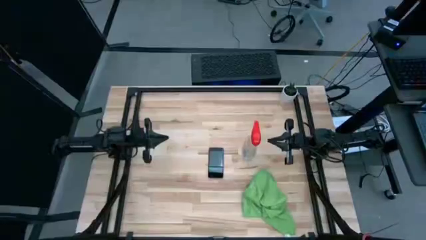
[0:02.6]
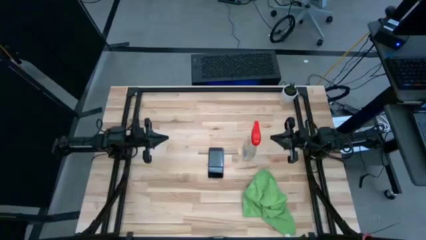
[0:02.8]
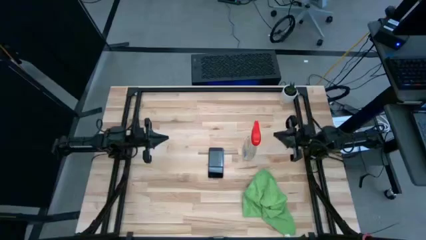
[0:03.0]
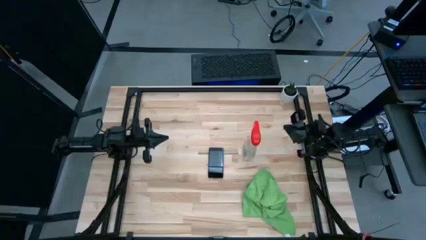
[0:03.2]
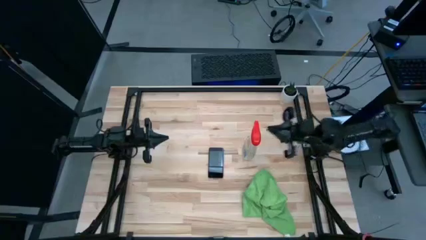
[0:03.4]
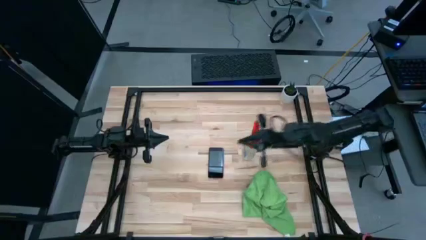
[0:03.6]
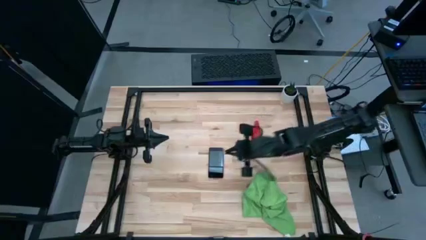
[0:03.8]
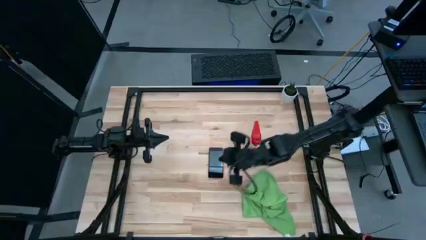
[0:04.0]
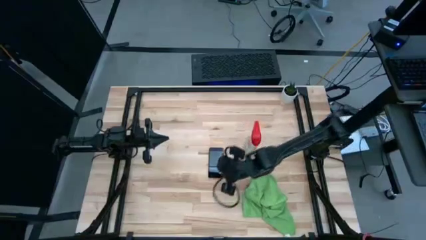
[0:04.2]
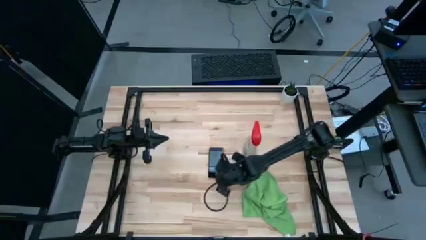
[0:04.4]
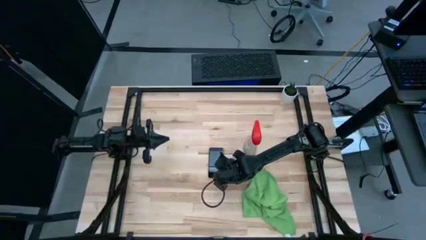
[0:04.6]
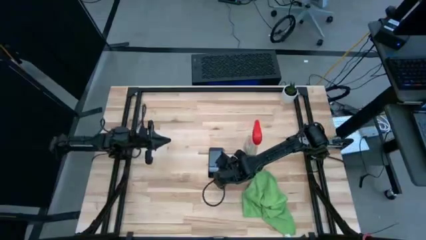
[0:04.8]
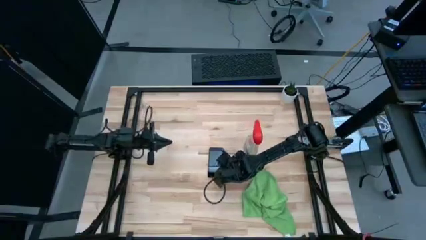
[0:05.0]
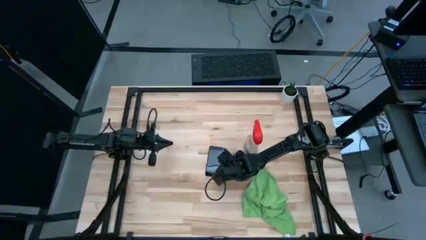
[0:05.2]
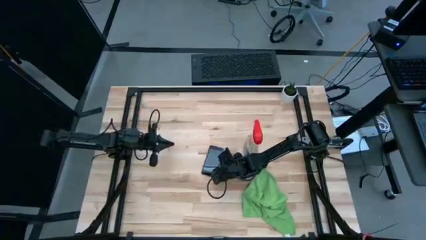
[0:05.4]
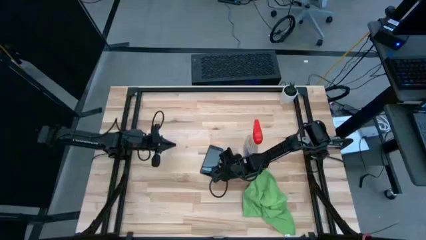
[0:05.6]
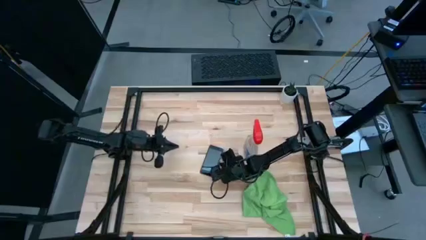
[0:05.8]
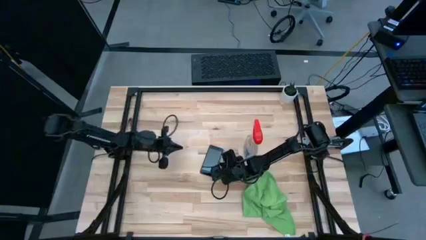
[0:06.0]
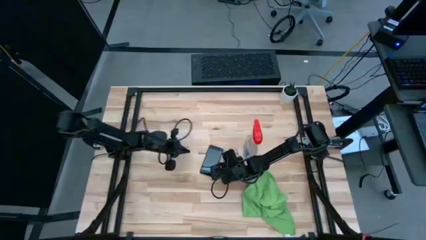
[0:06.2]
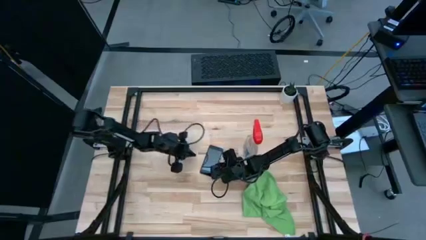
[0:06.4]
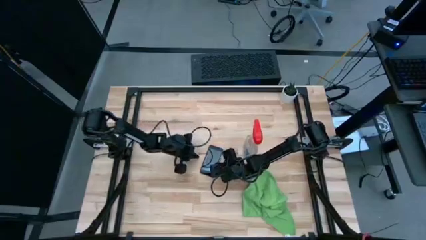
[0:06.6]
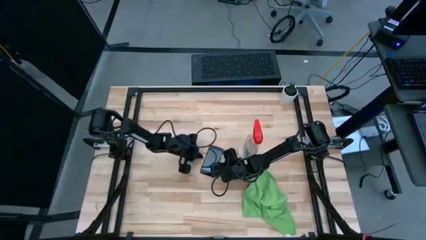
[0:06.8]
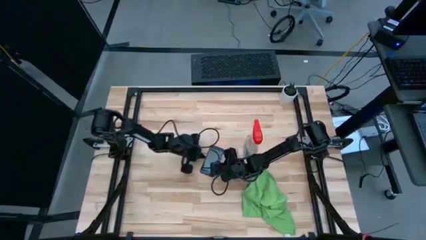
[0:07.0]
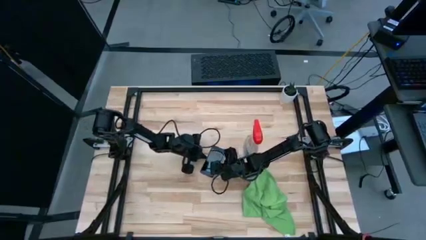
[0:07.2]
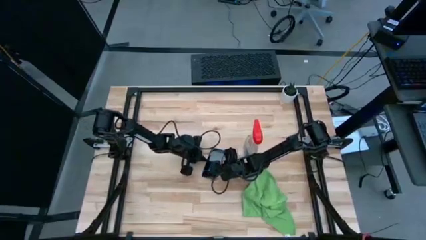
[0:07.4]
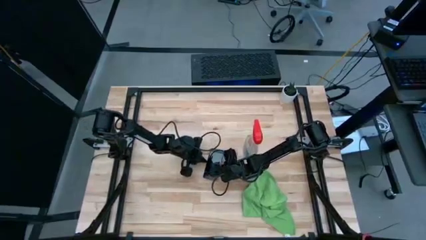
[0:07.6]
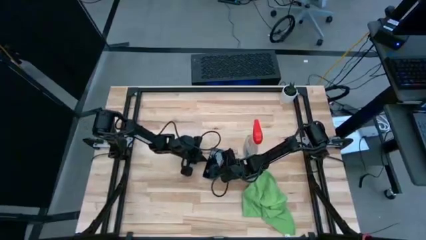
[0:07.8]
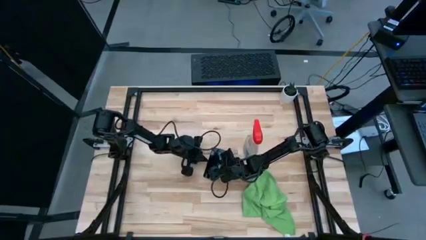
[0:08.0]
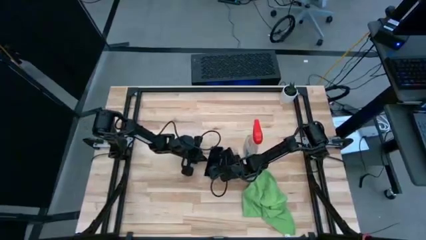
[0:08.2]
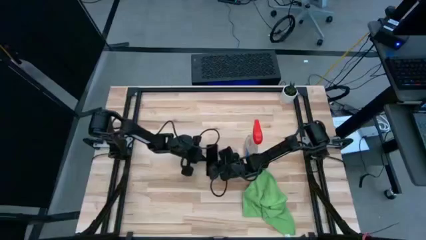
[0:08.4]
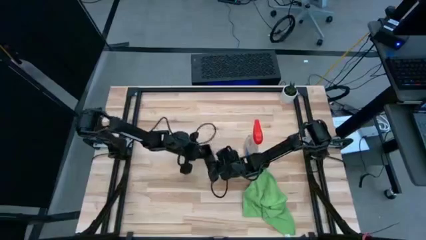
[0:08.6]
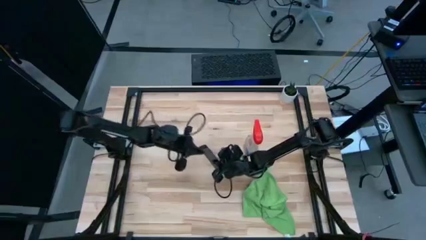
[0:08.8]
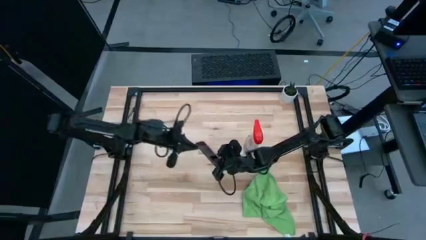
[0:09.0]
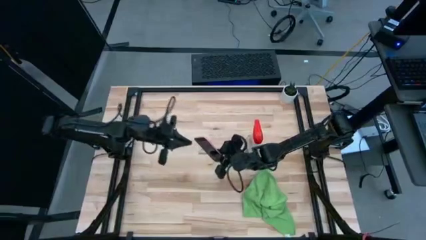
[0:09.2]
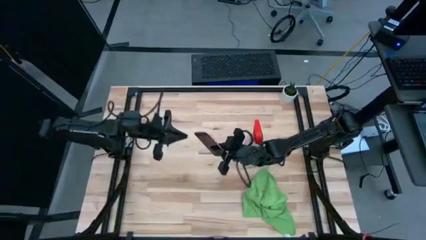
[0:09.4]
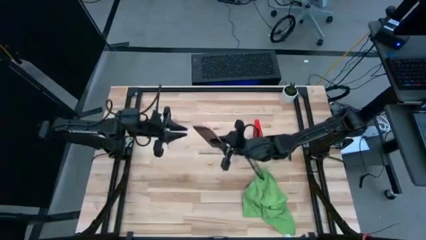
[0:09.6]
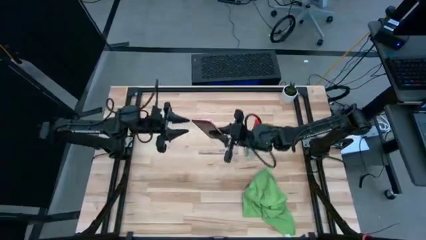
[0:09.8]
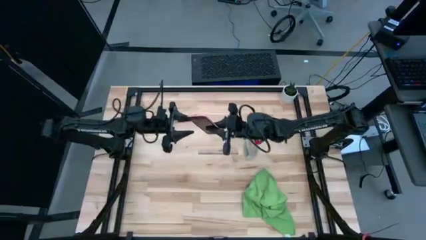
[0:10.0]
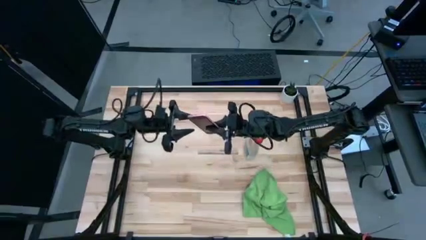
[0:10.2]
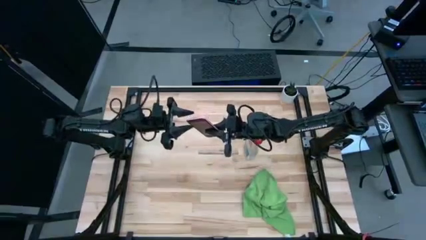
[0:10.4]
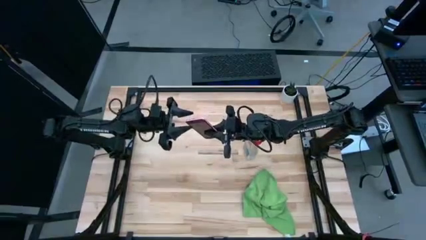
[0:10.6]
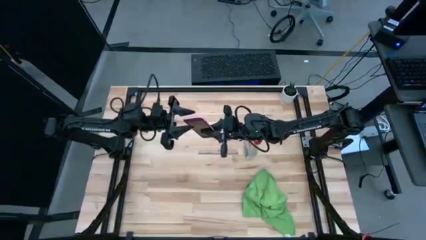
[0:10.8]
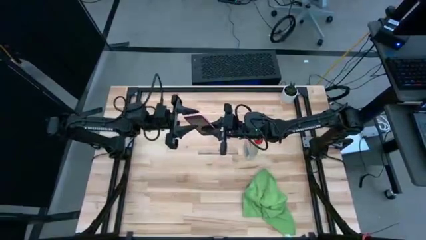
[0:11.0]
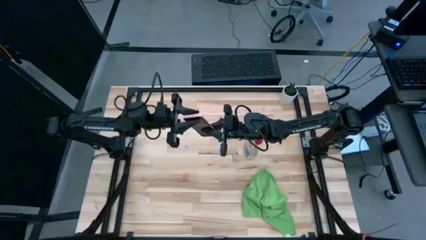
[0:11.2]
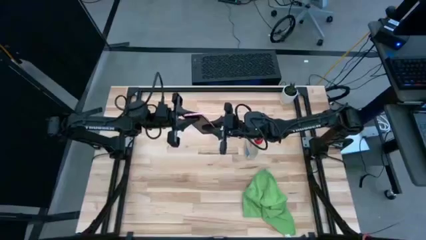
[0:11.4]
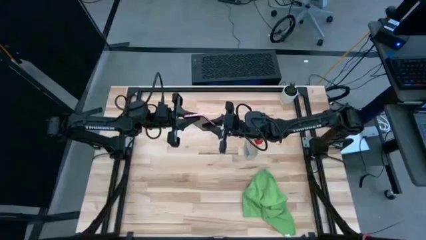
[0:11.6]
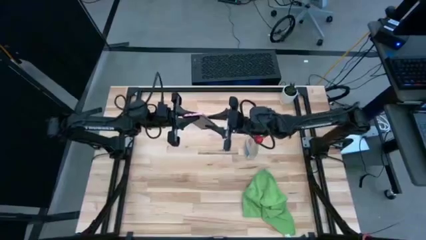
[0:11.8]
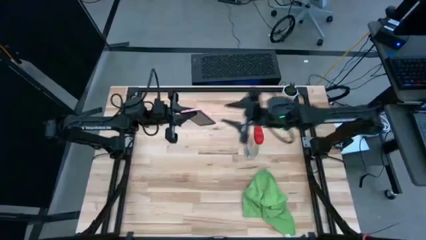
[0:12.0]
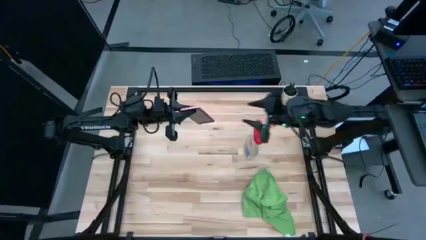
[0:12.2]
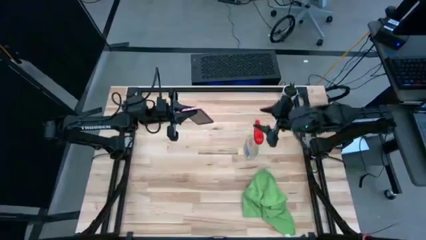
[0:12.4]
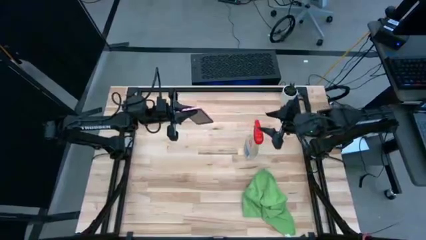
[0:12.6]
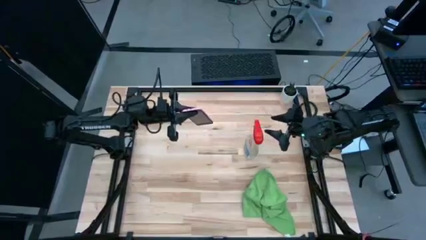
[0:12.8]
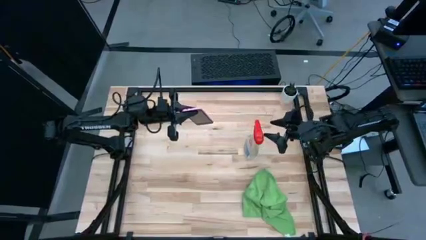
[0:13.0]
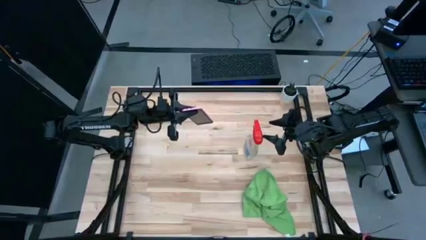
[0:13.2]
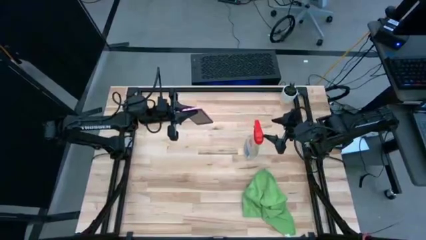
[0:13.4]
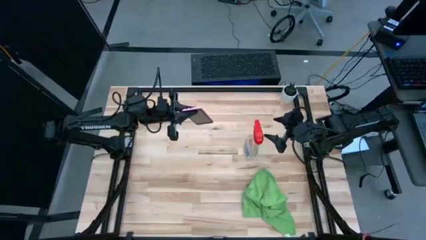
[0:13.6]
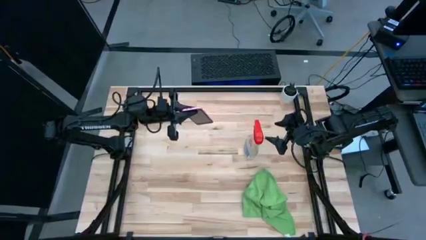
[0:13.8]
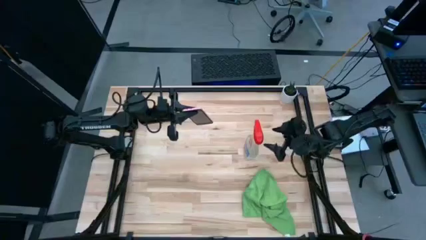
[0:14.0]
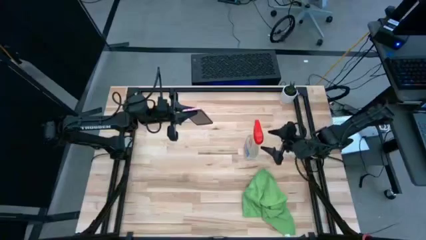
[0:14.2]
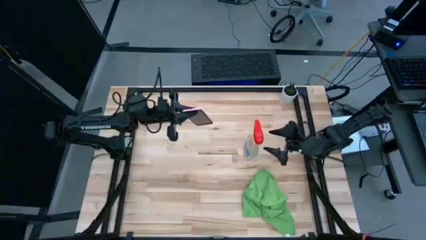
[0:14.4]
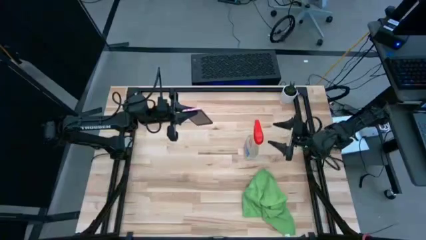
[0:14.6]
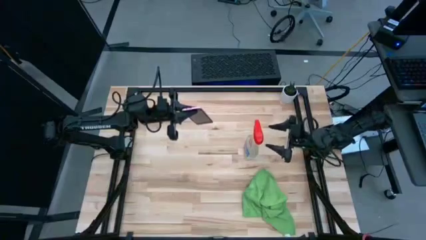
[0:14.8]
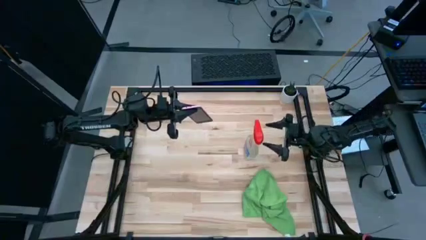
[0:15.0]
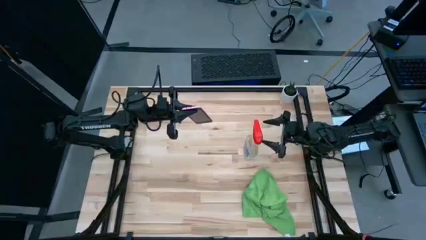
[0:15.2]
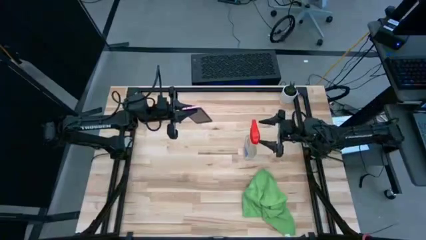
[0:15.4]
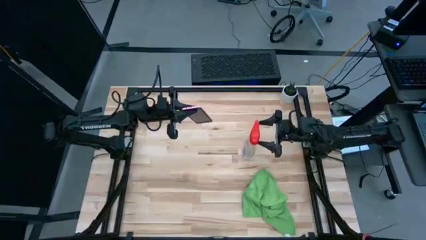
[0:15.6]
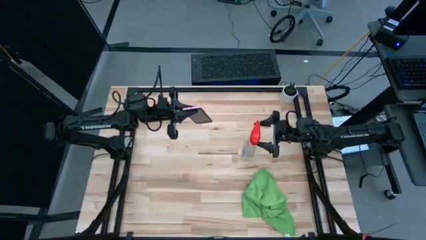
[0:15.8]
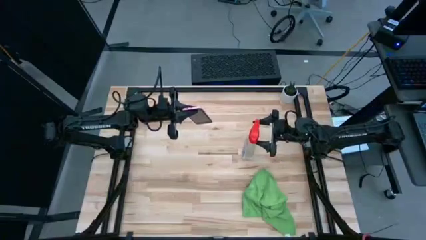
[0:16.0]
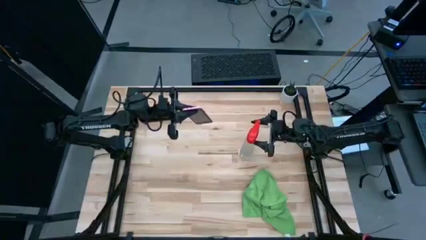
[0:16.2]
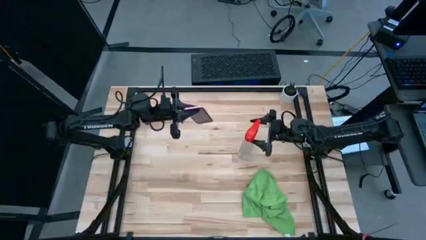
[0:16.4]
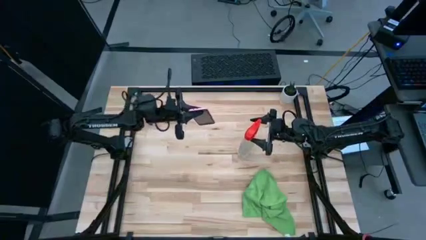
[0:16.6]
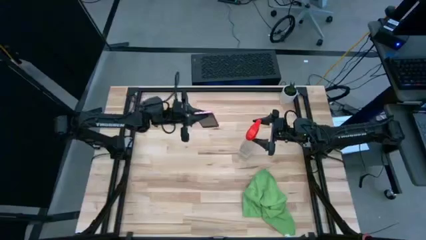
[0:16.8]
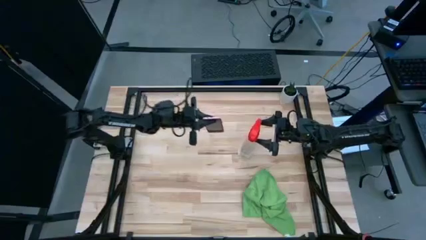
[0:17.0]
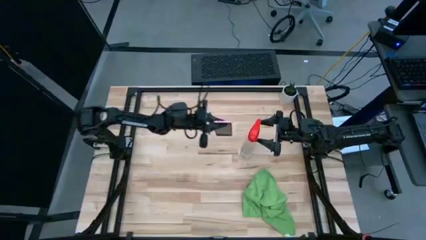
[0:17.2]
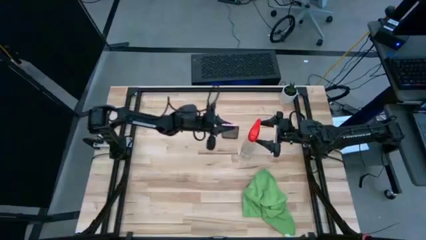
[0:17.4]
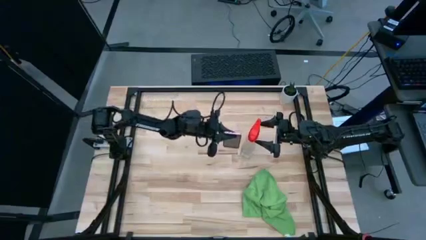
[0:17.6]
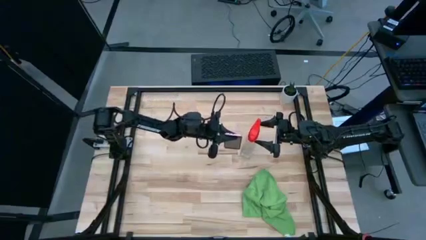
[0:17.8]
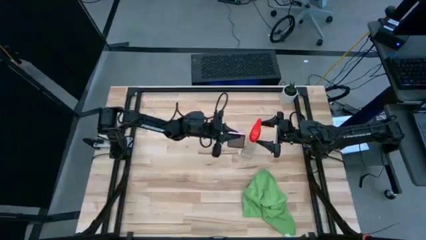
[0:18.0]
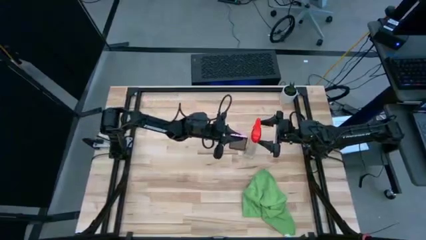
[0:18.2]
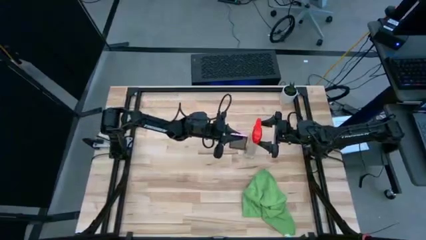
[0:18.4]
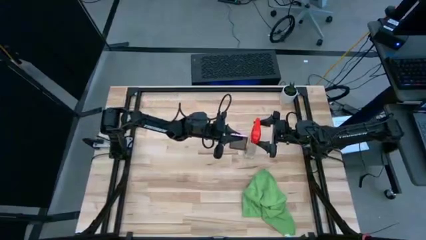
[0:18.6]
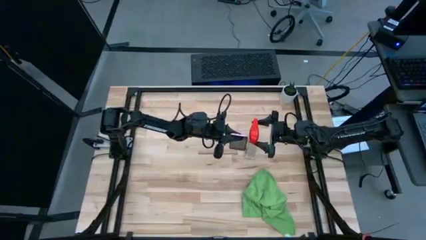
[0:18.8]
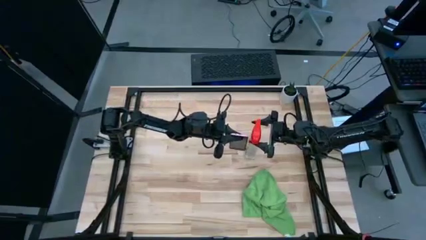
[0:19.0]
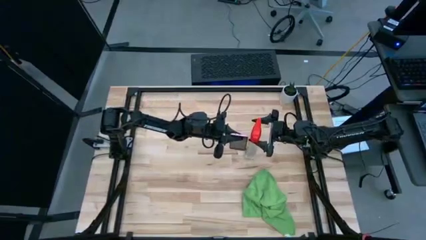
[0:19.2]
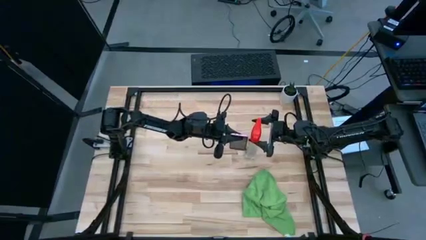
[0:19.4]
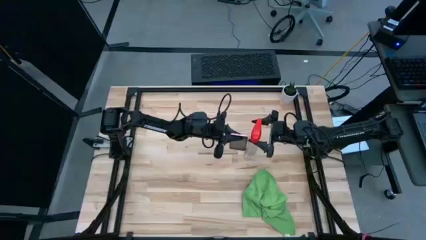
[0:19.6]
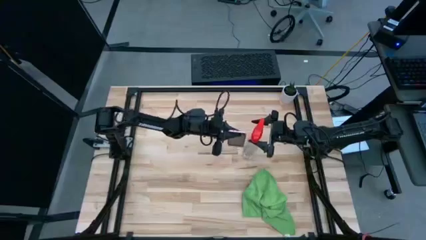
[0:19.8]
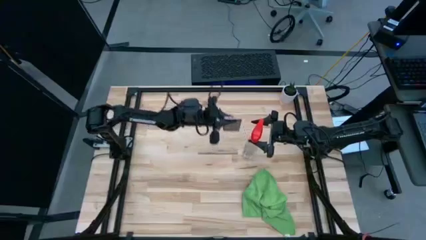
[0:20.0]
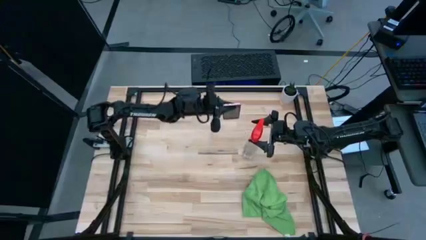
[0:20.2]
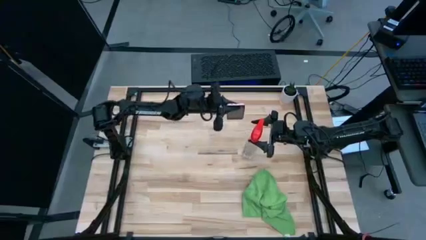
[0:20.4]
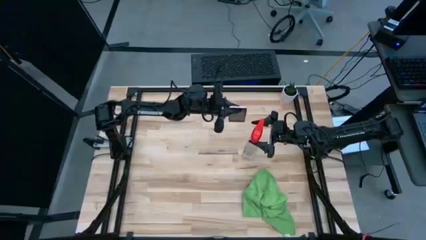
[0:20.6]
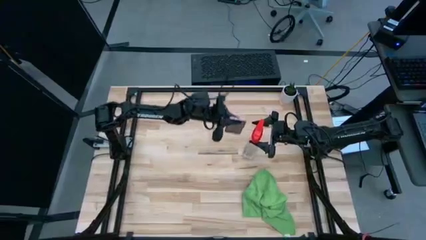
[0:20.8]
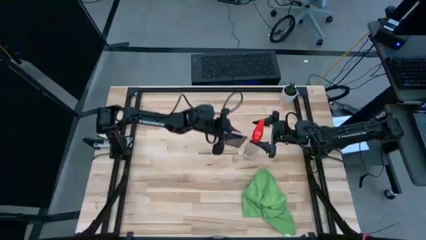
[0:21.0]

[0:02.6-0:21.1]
Task: Apply microfiber cloth
Spray the front of the cellphone with the cleaning bottle
